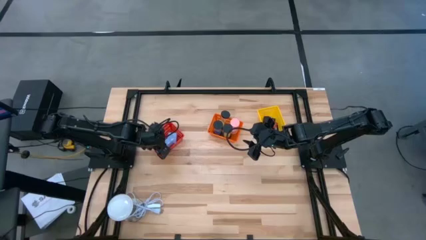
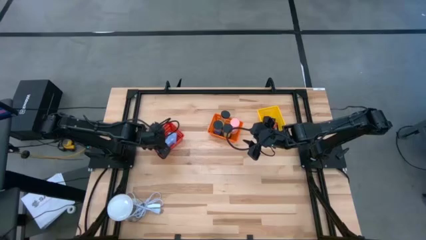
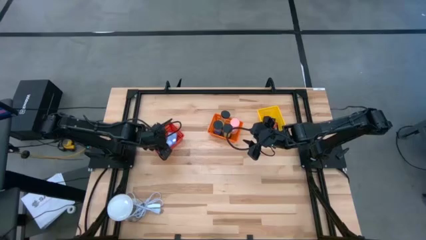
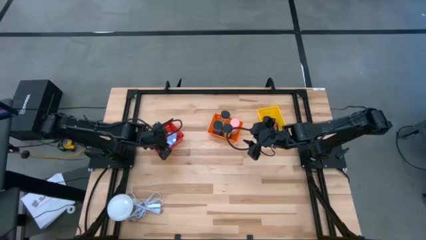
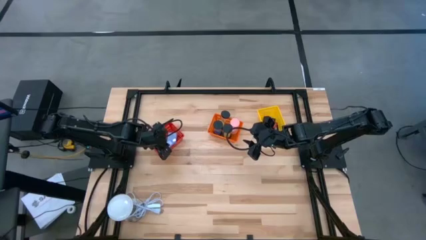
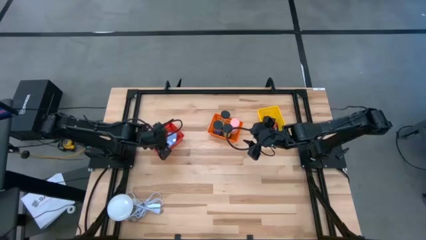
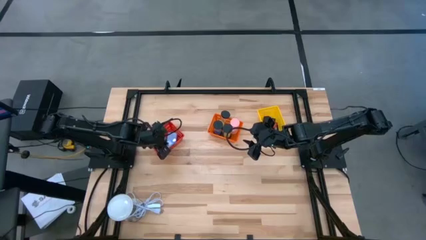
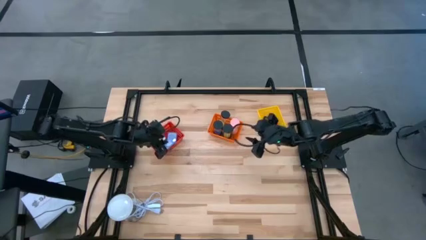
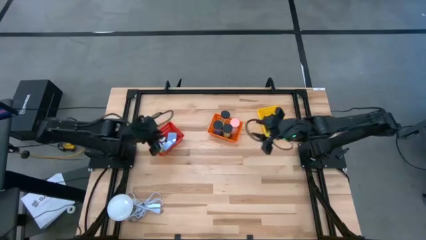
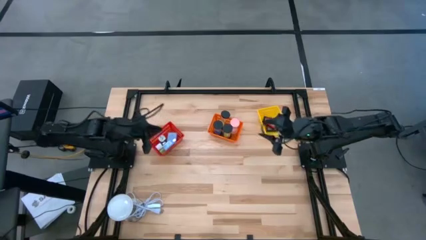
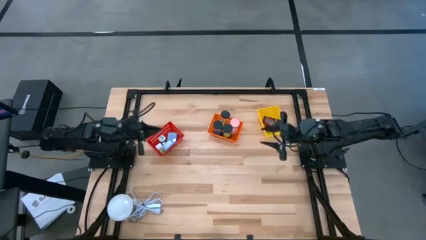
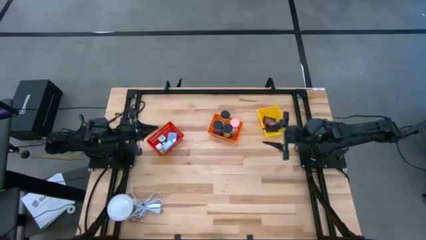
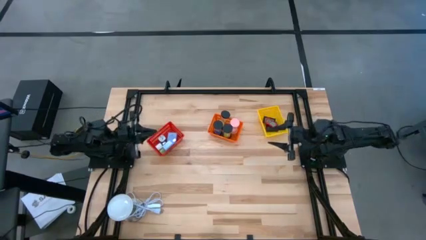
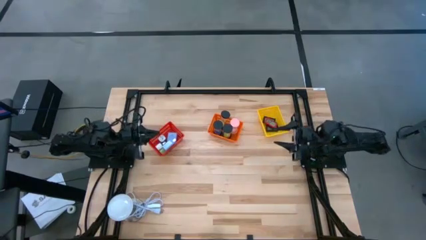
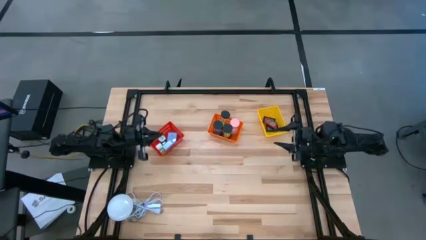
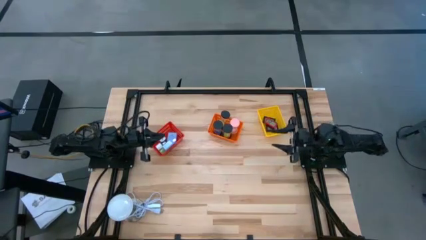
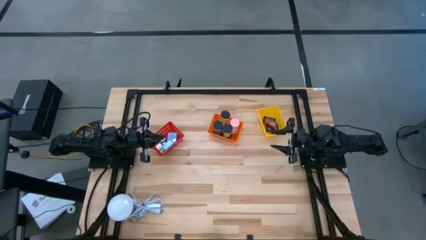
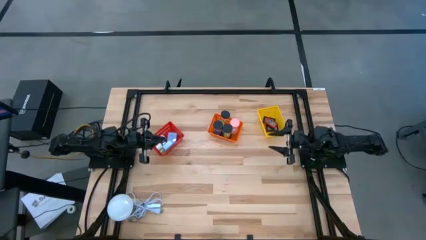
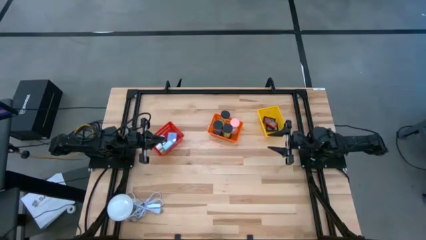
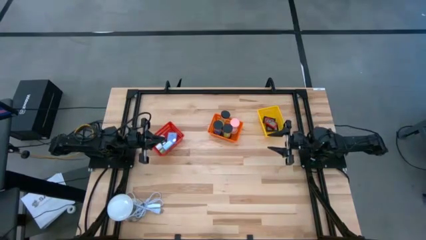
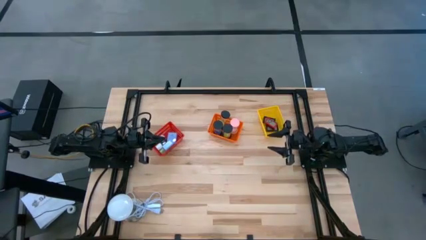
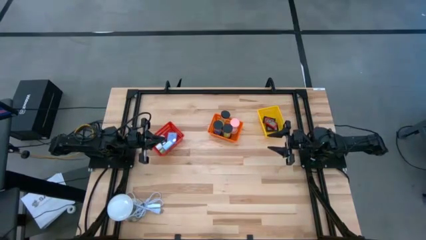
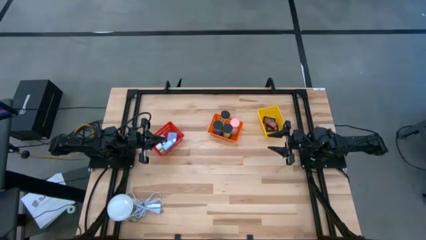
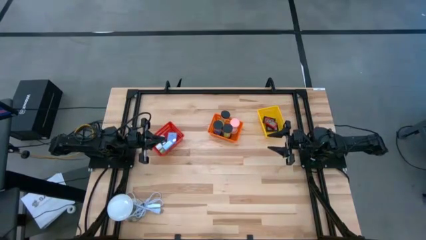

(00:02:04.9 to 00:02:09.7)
Task: Pick & Place Office items
Return to Home Position

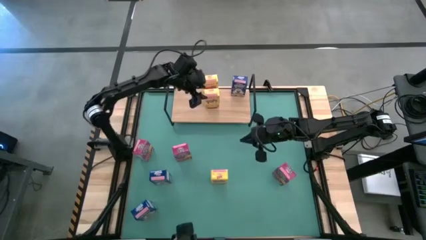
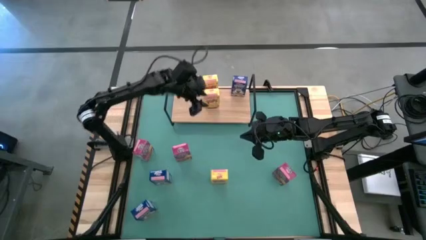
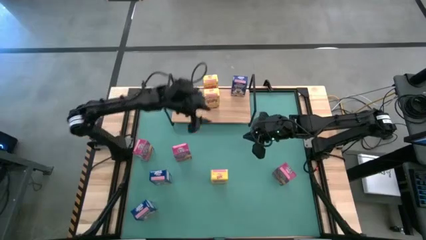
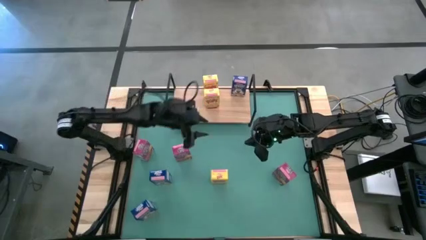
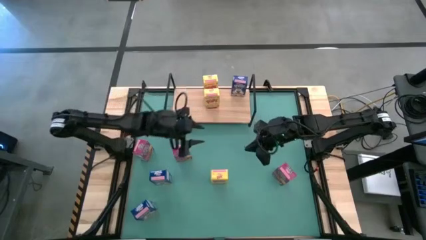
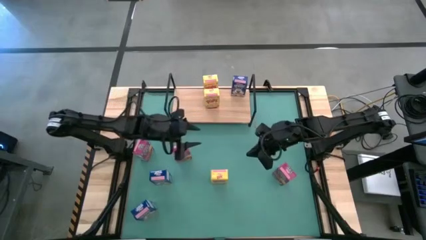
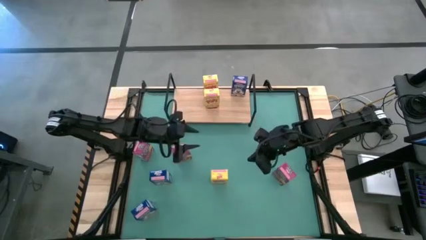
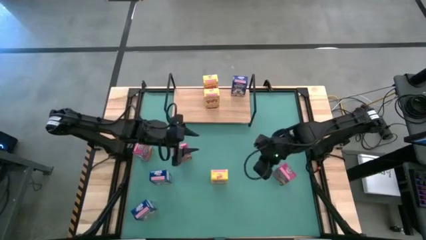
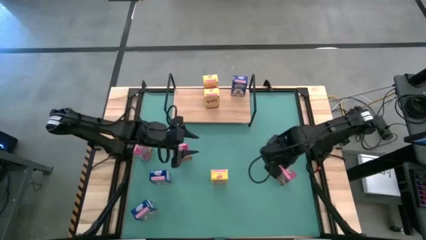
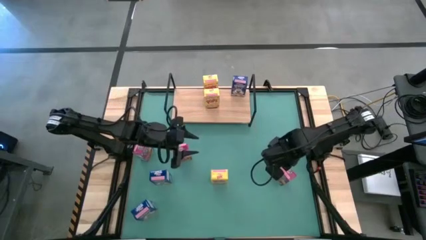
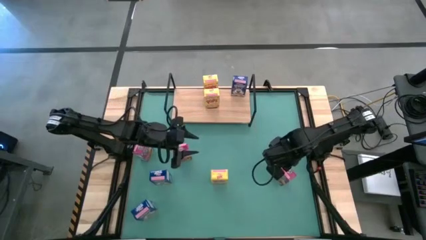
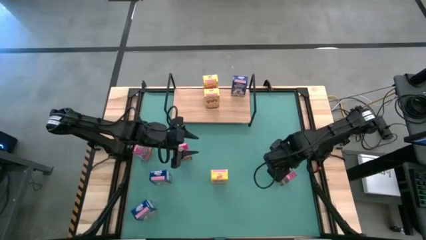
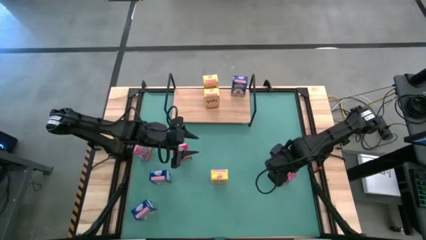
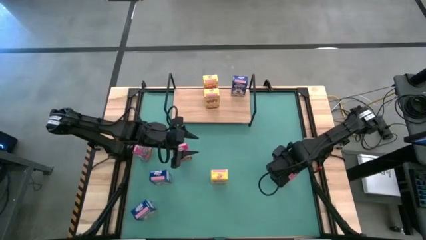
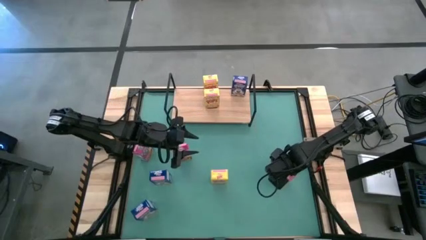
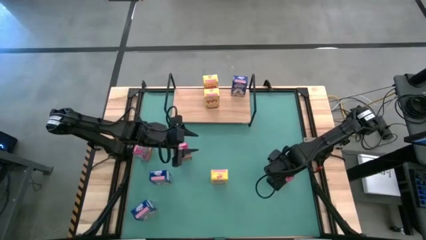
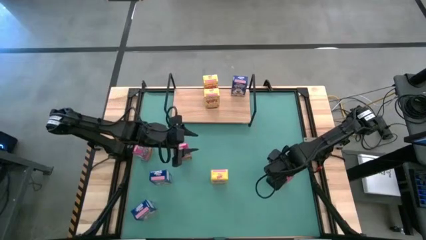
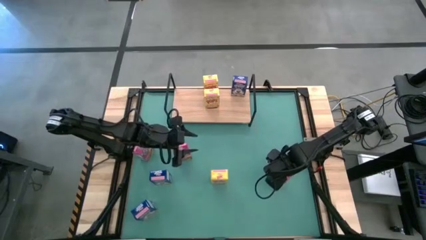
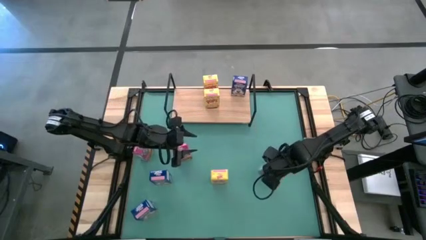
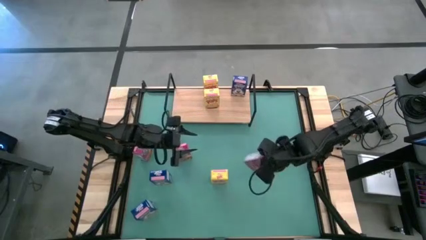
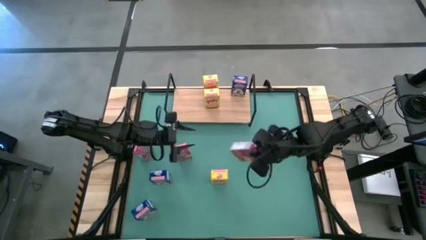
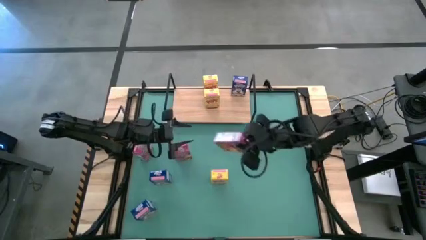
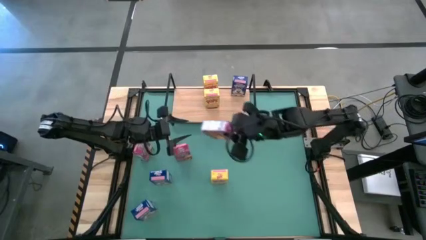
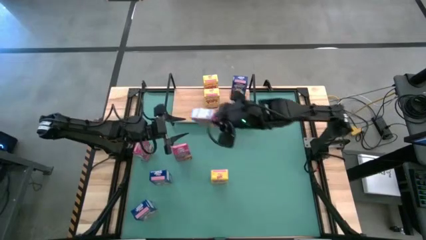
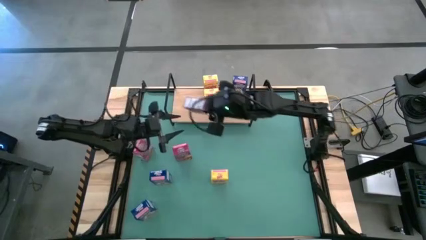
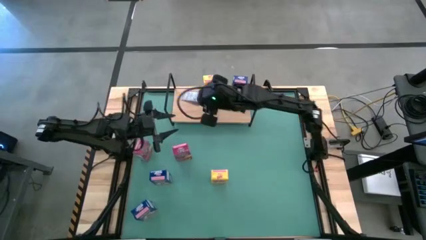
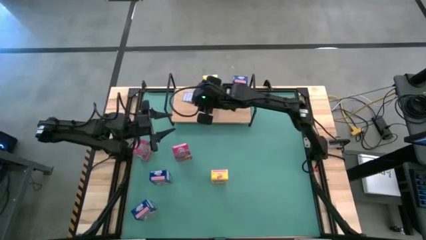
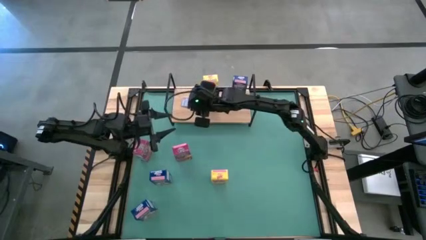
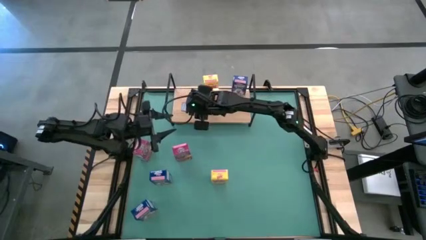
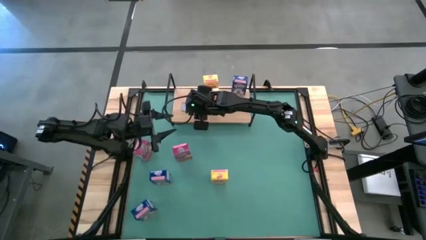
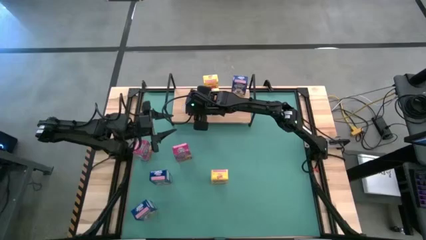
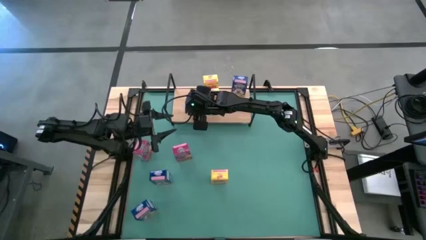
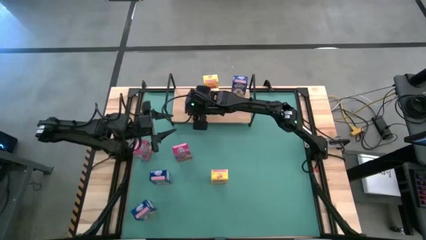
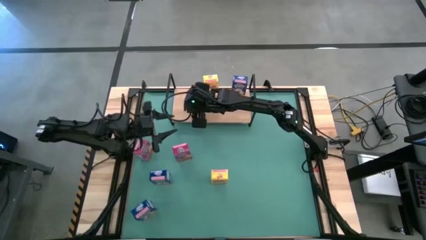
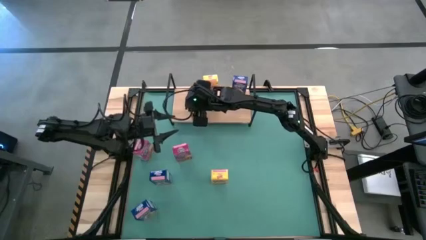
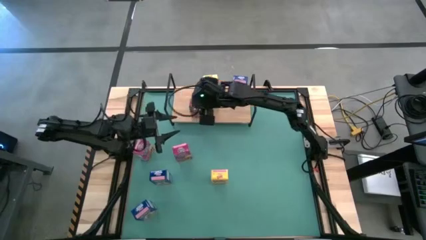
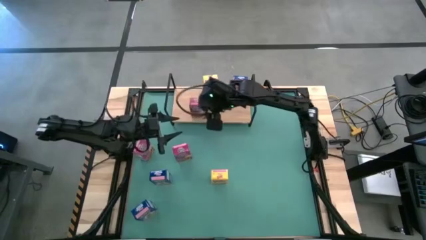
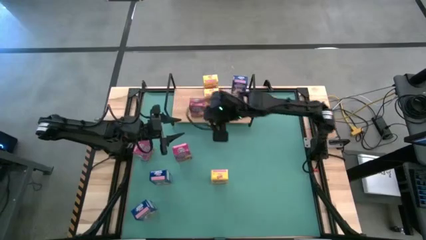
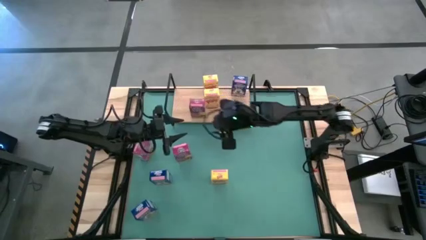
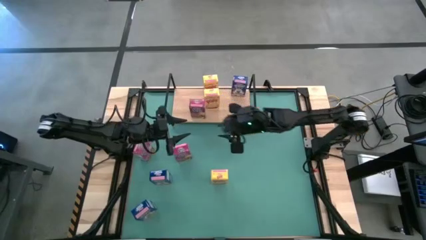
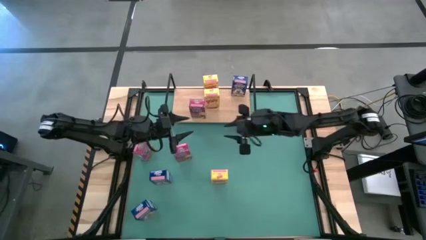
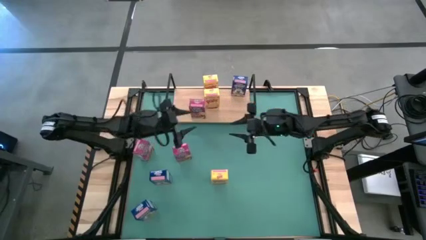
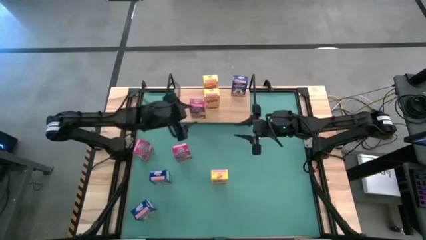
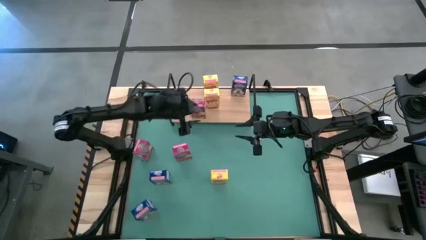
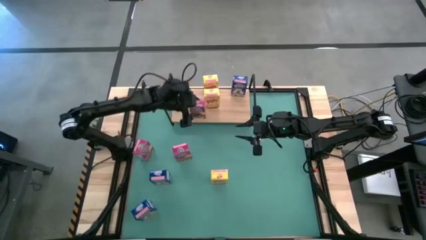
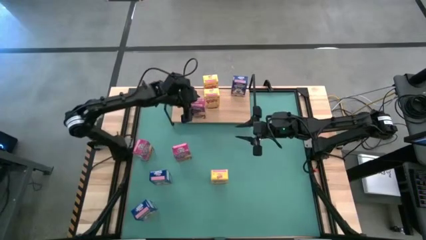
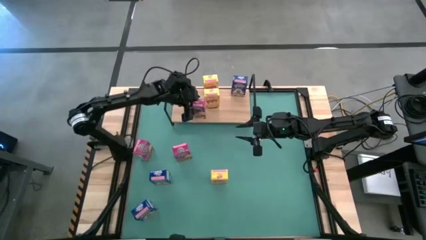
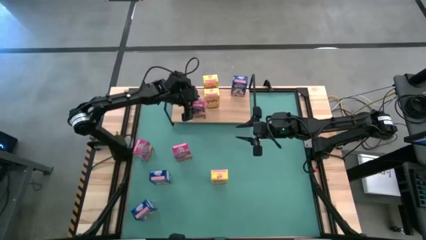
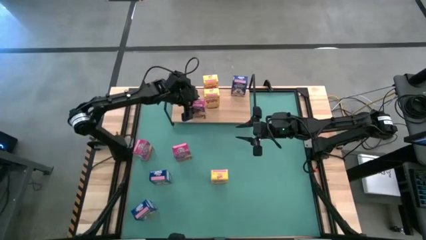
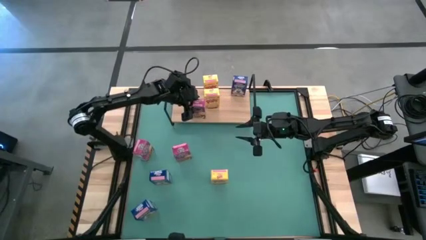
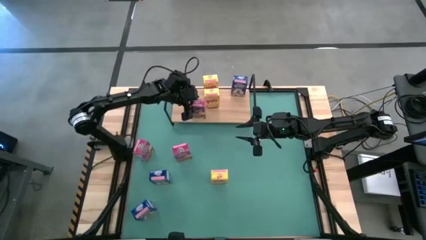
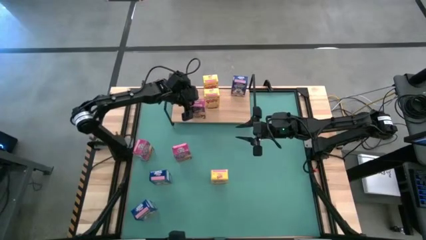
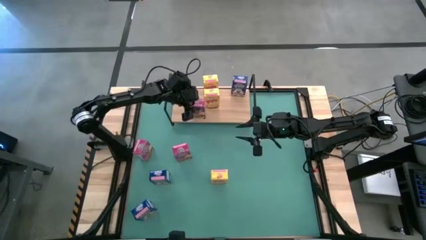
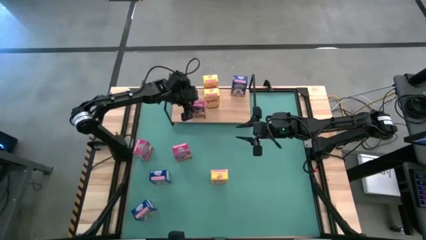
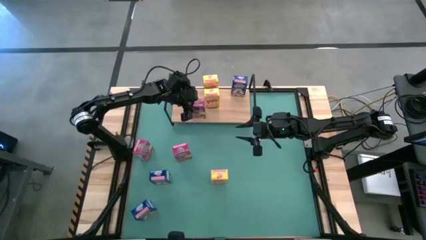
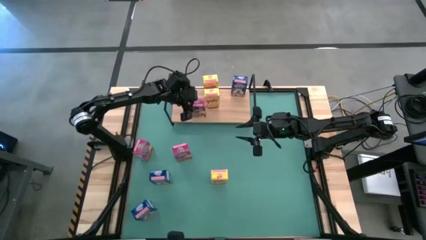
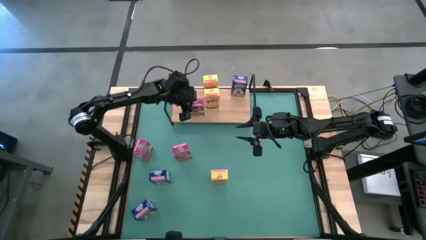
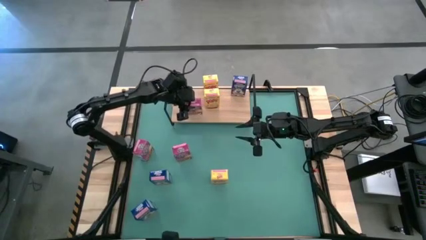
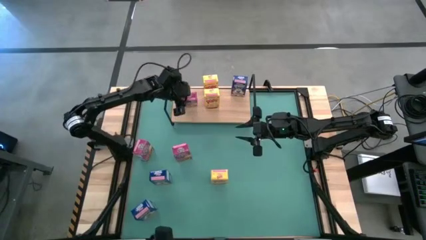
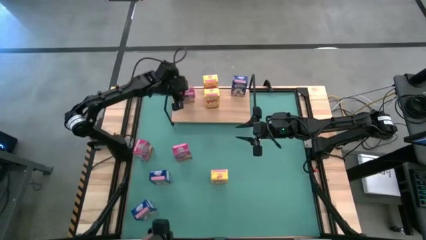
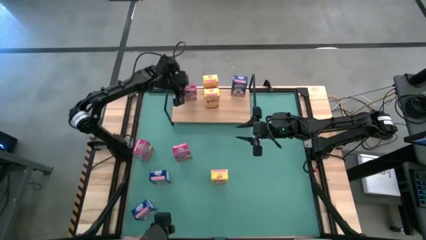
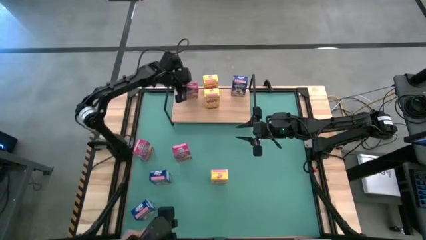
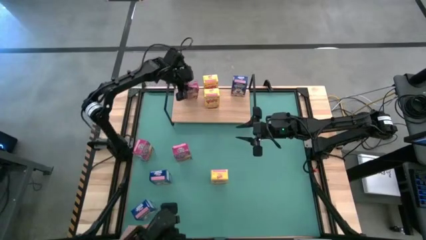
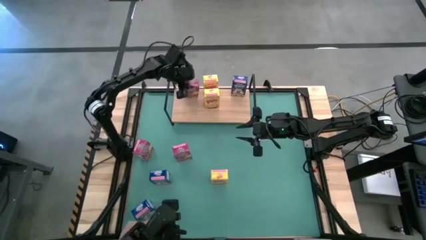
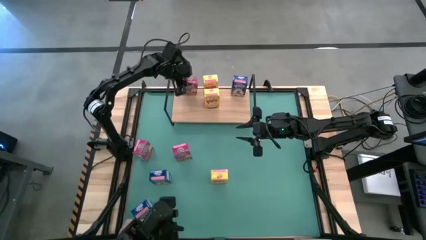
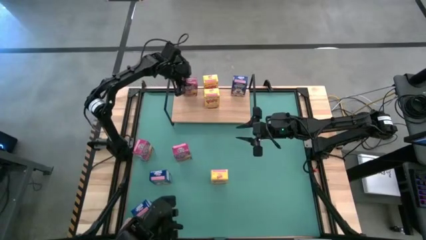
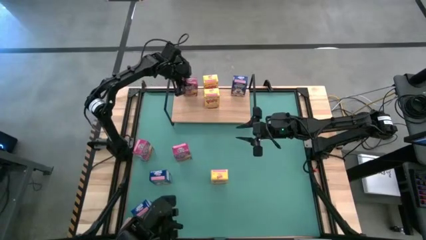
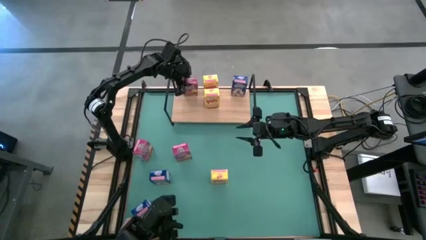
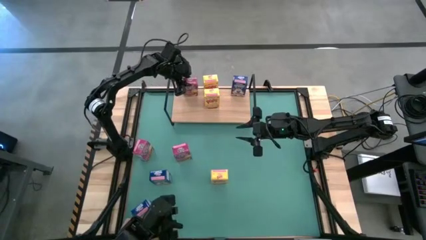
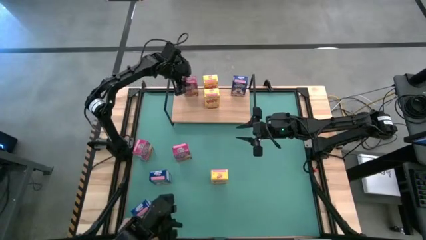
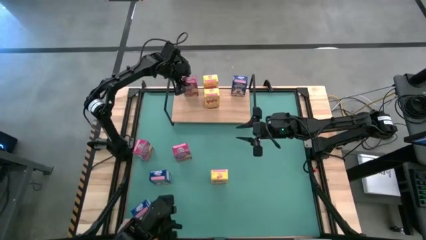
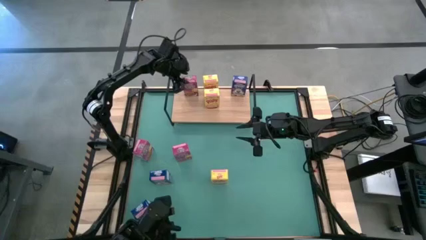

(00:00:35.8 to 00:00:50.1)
Task: Stack cereal on shelf
Put the right pink cereal box on the shelf
